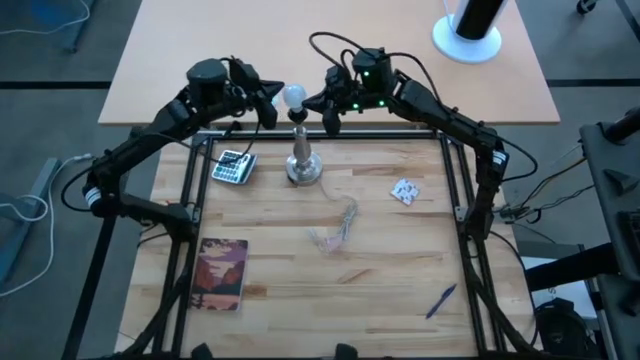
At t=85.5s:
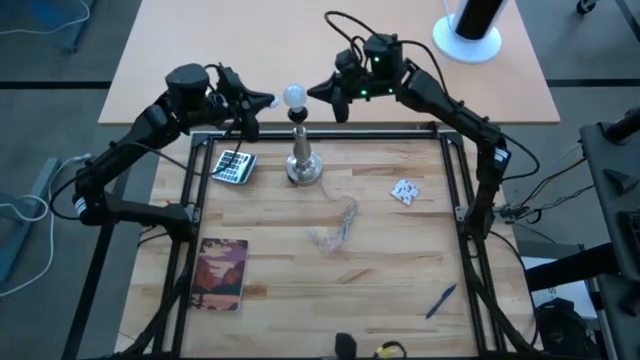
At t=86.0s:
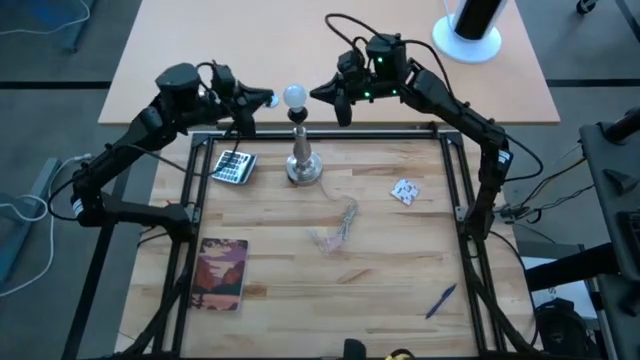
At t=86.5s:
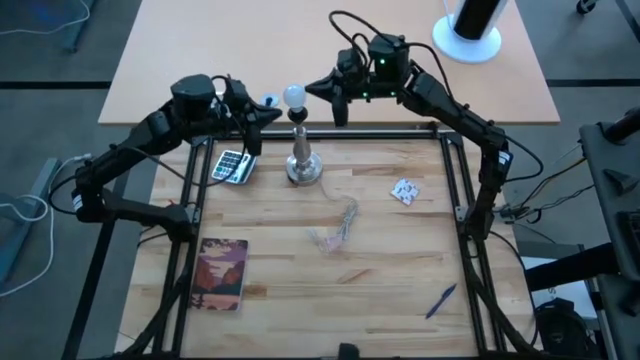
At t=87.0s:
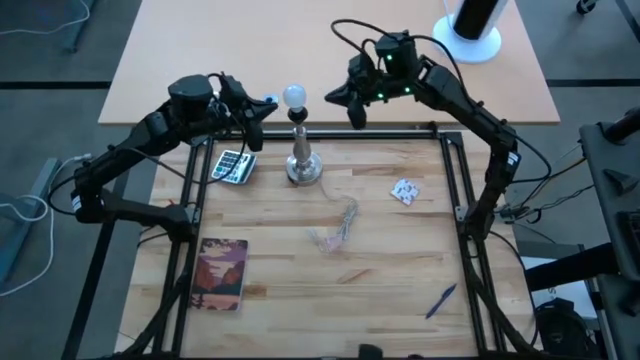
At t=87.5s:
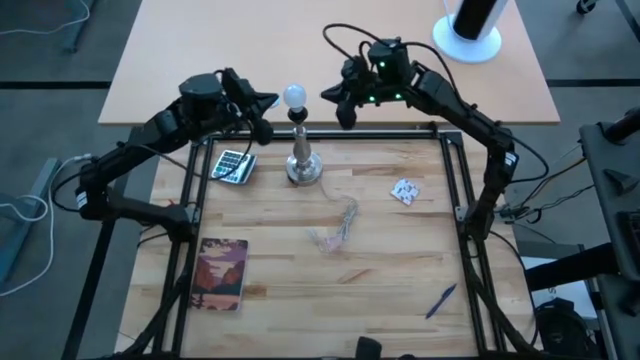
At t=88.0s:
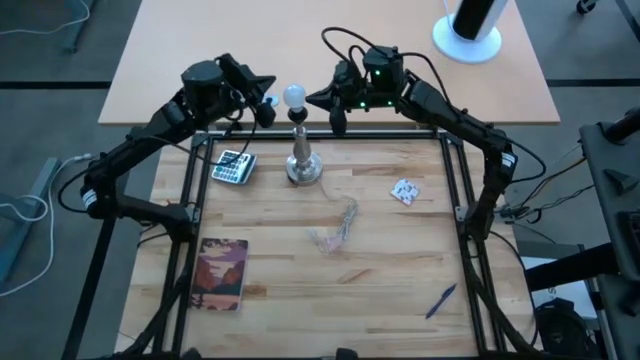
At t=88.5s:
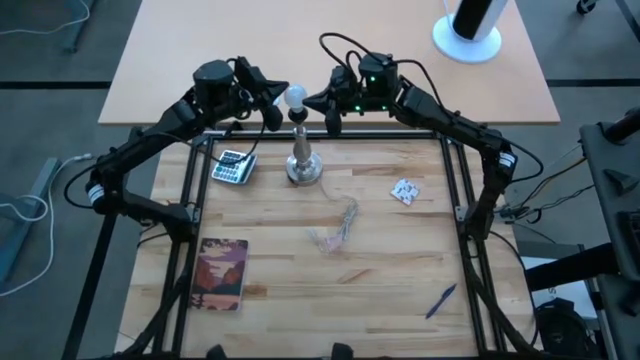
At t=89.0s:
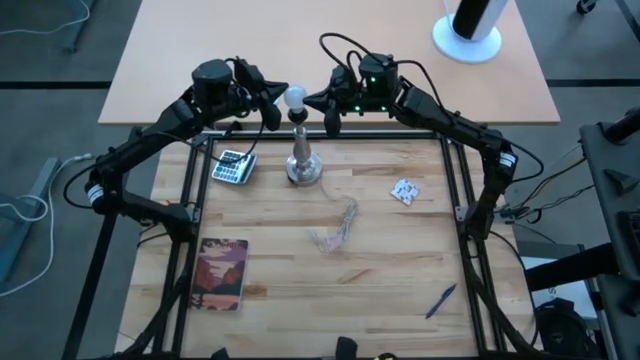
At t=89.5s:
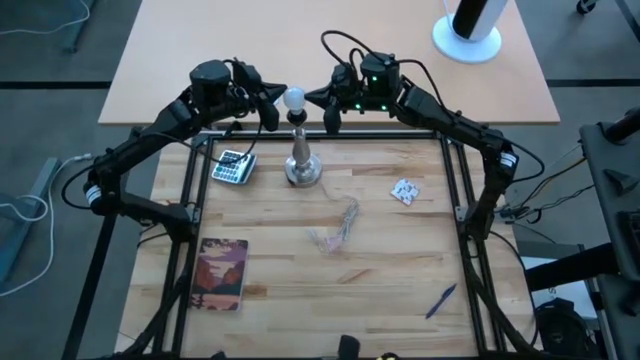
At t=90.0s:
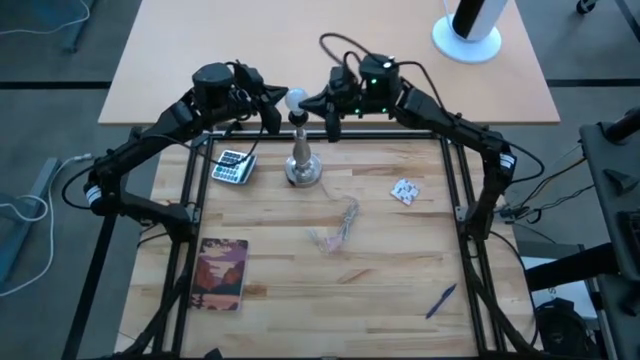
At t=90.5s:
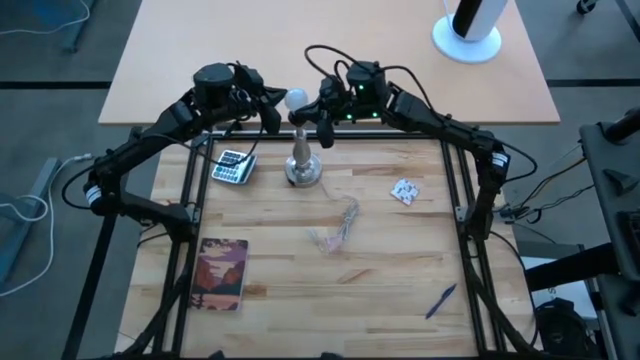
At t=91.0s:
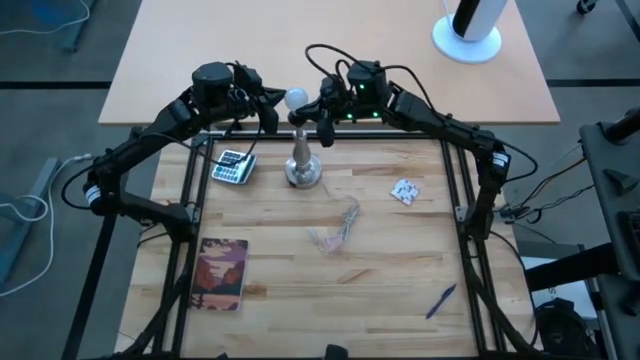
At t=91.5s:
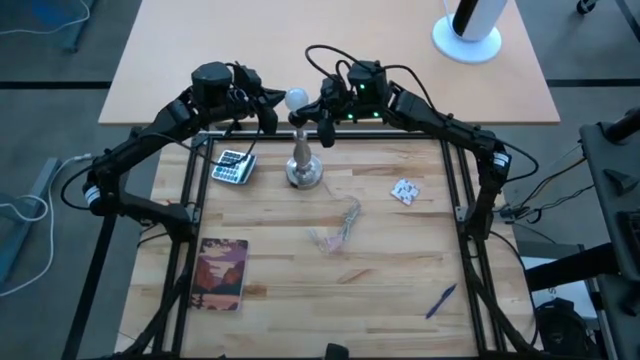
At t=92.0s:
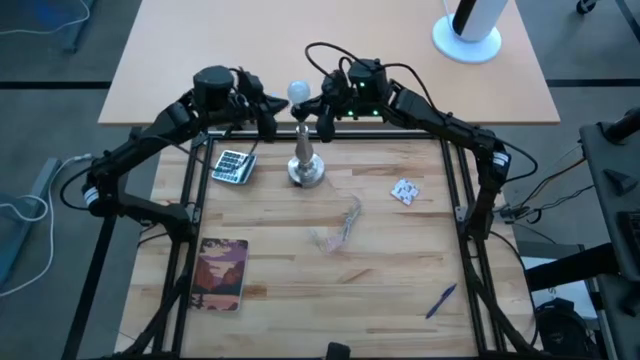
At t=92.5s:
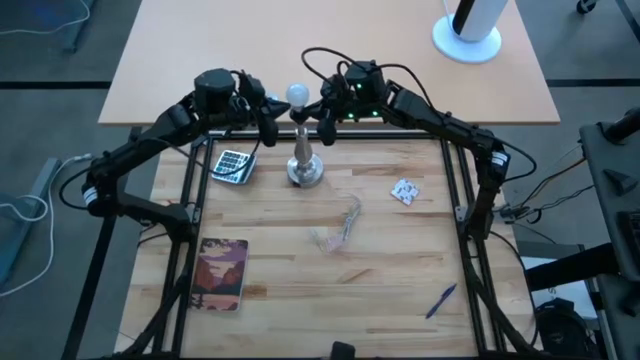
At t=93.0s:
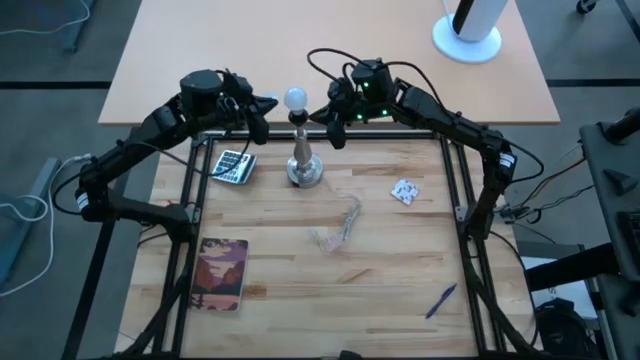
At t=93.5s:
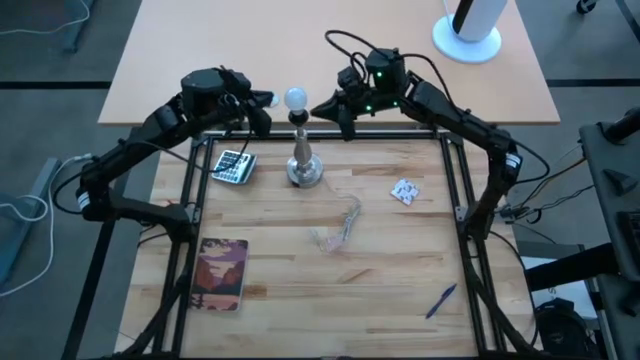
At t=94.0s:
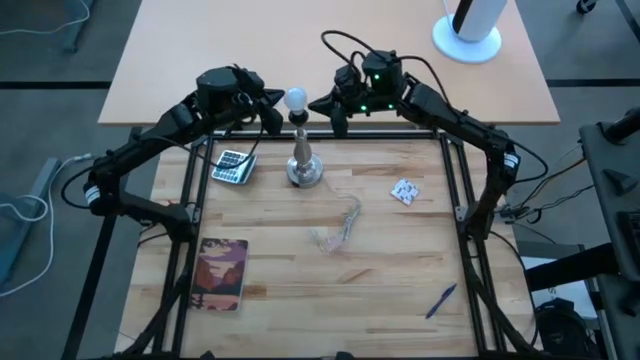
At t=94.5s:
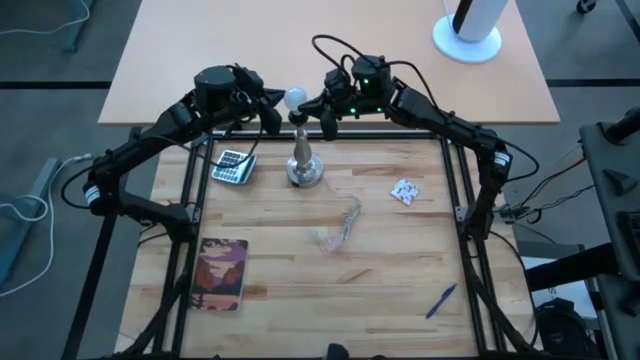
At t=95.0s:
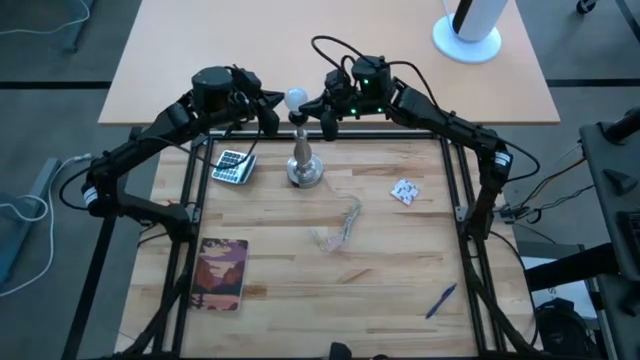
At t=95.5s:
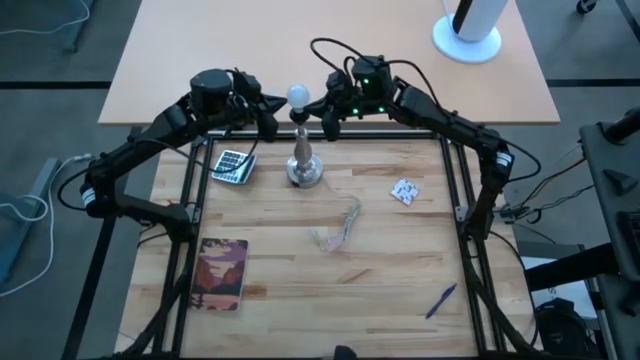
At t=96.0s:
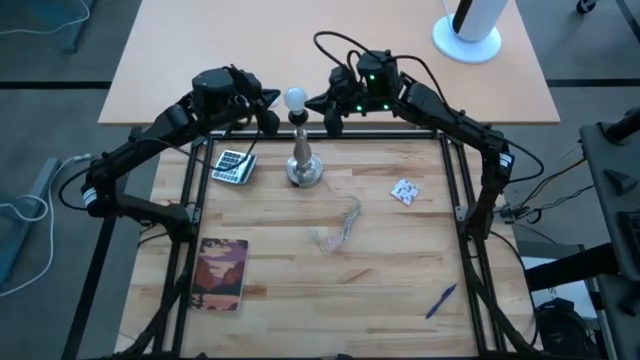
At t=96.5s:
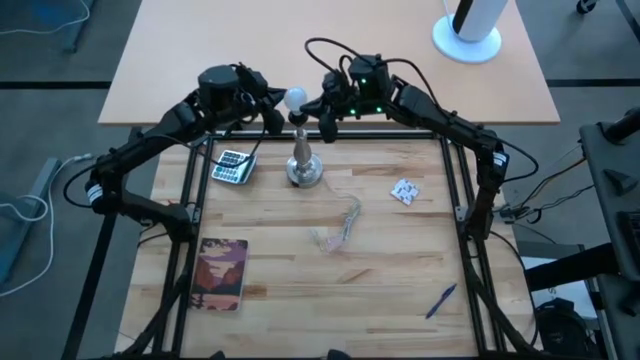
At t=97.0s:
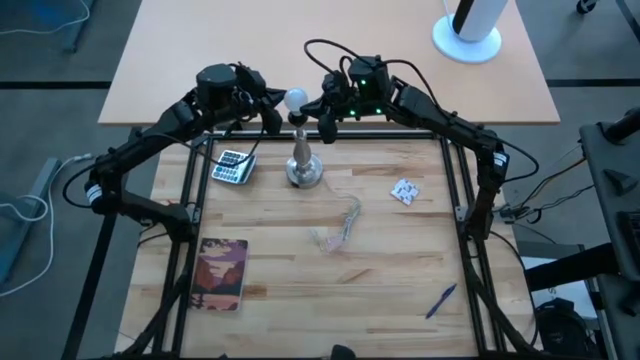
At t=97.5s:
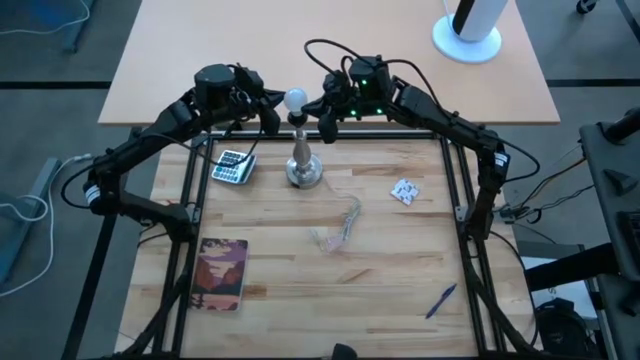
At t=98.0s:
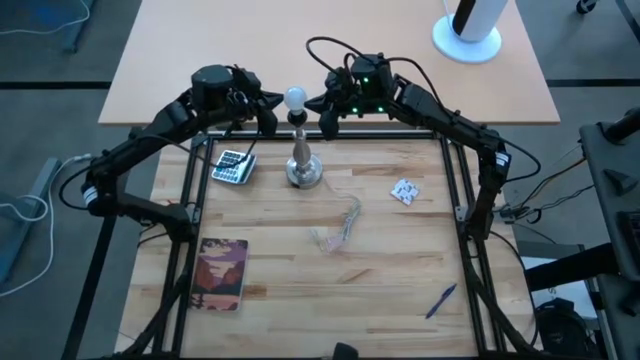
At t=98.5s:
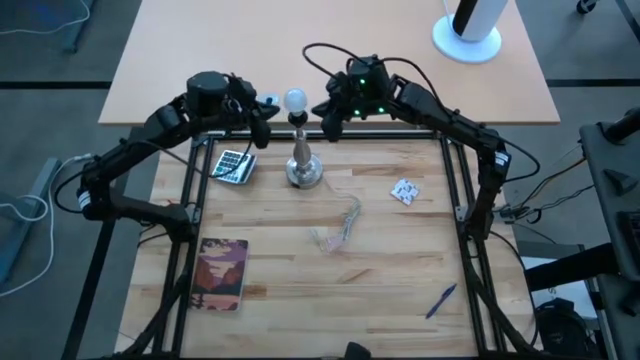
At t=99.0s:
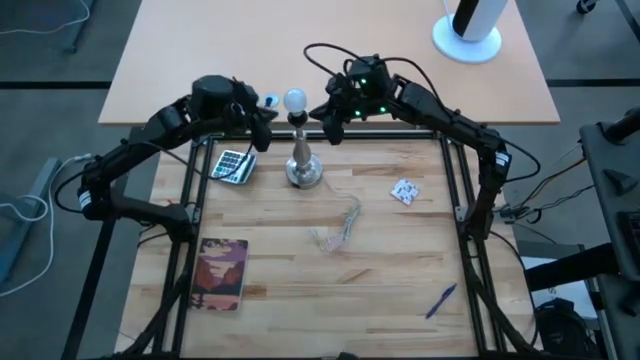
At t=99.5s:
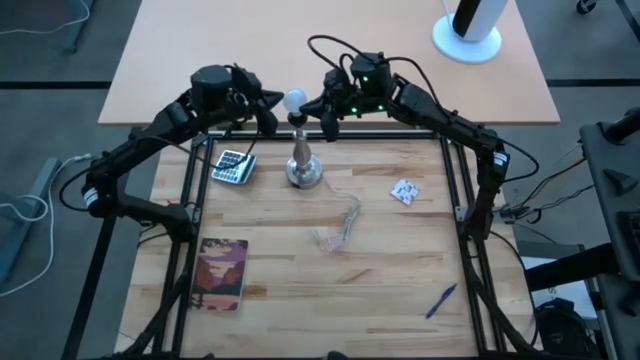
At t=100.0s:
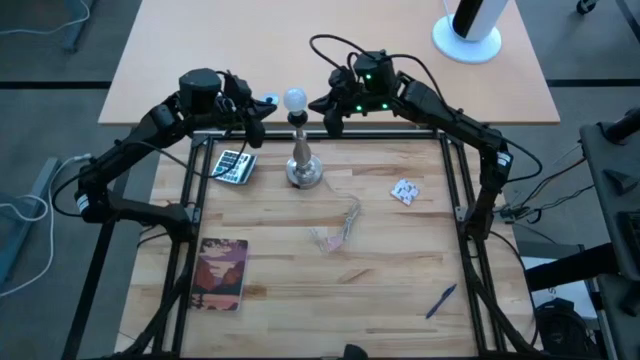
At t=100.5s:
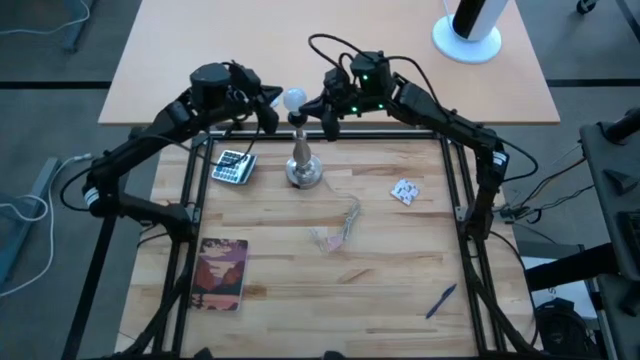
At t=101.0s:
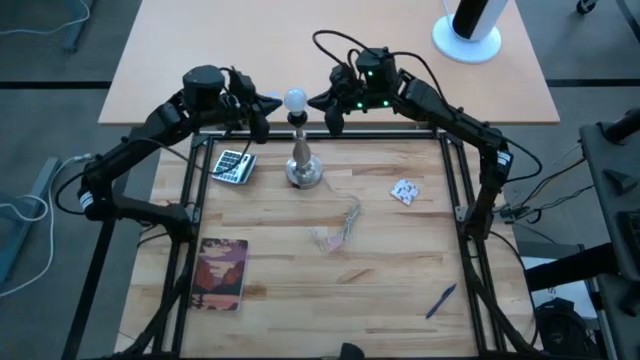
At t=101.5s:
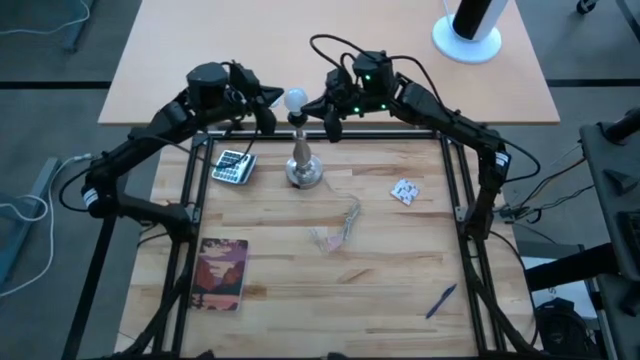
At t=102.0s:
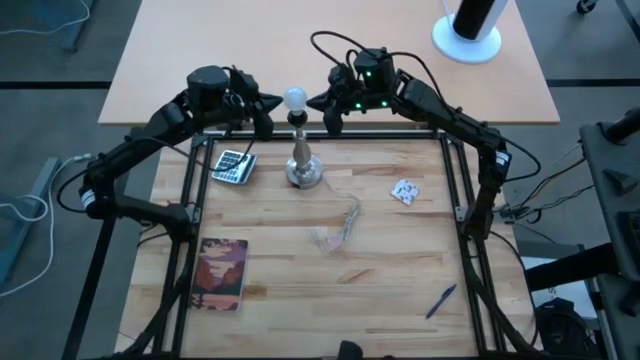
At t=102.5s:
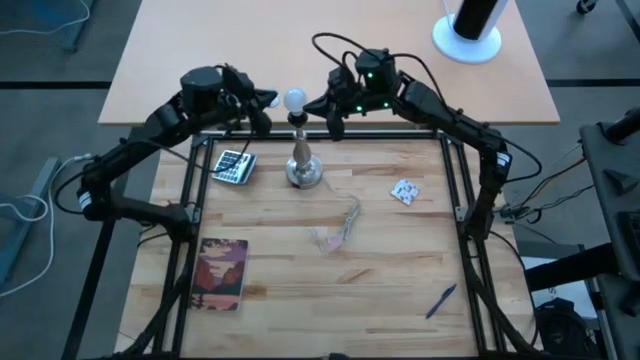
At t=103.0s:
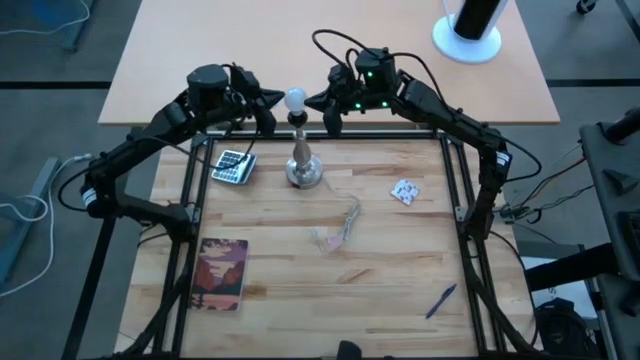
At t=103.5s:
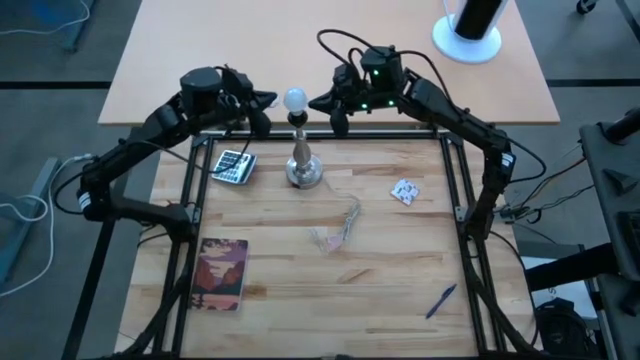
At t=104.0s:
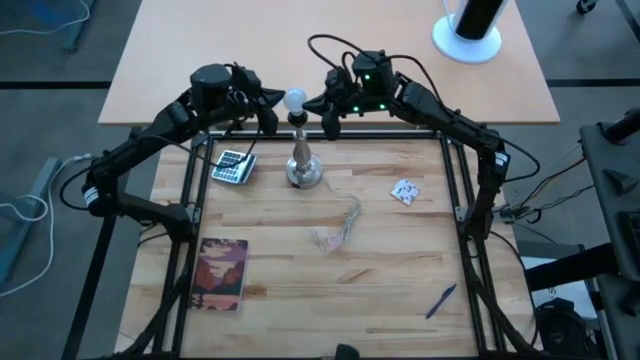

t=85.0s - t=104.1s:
Task: Screw lightbulb
Remove the lightbulb from the lamp
